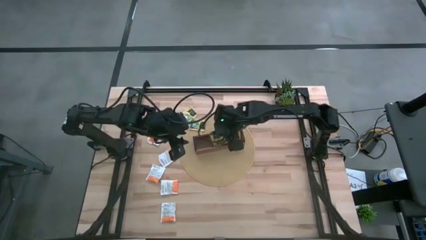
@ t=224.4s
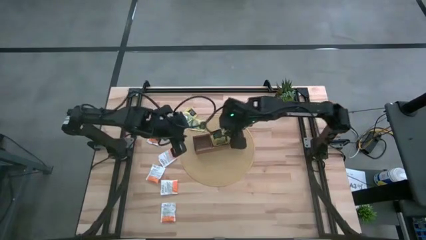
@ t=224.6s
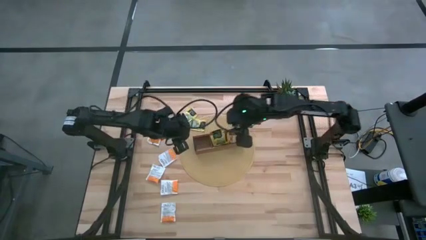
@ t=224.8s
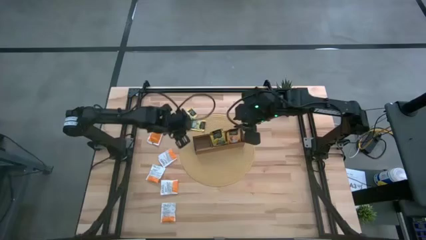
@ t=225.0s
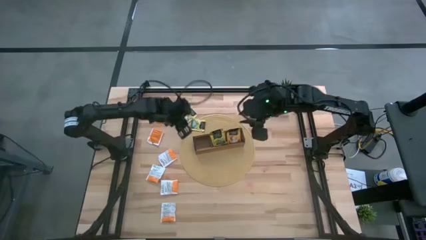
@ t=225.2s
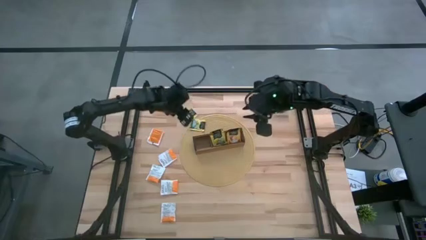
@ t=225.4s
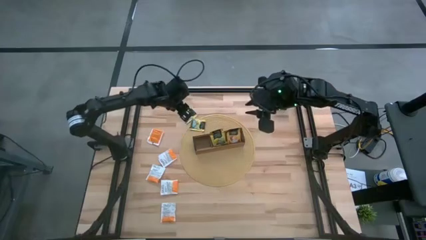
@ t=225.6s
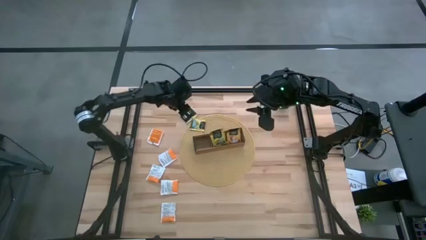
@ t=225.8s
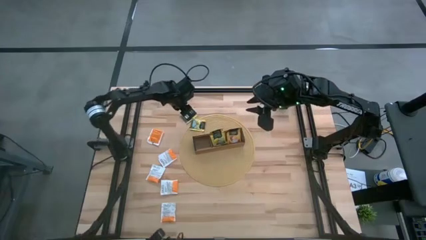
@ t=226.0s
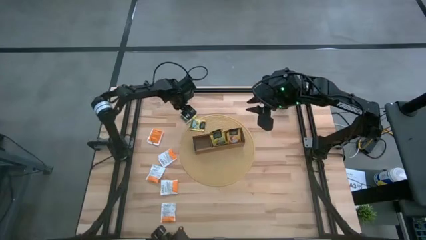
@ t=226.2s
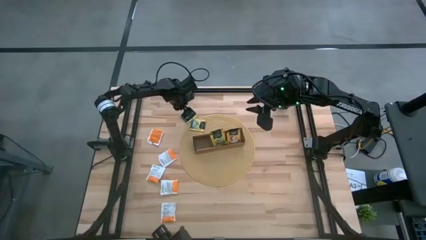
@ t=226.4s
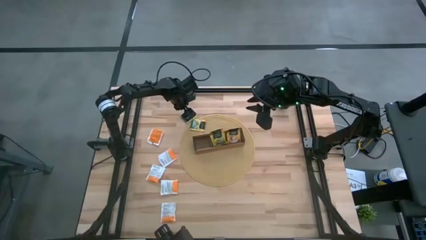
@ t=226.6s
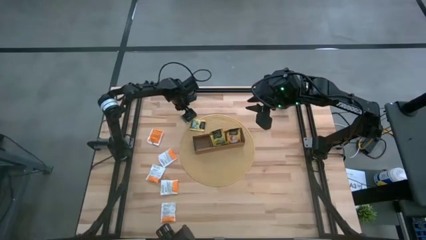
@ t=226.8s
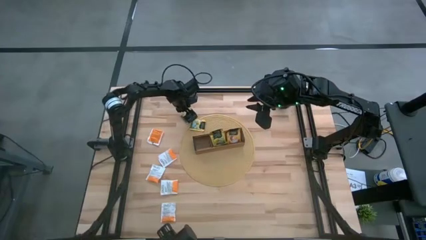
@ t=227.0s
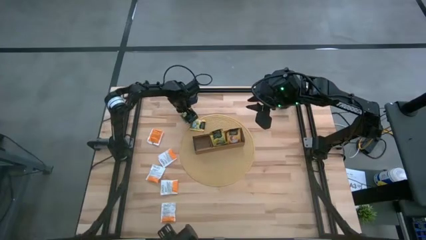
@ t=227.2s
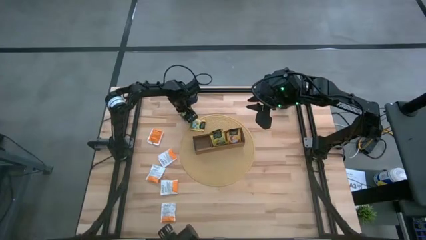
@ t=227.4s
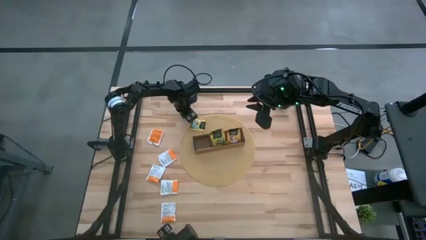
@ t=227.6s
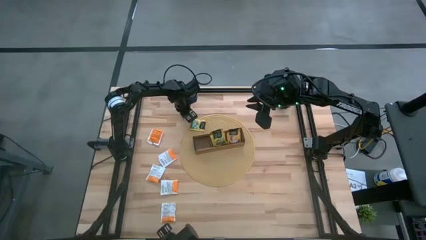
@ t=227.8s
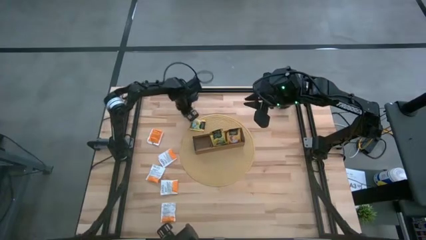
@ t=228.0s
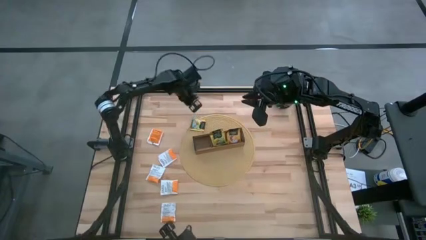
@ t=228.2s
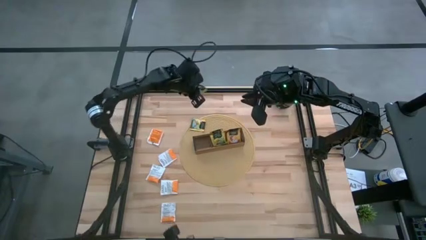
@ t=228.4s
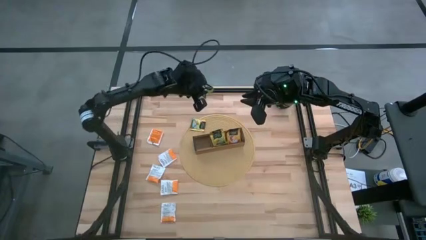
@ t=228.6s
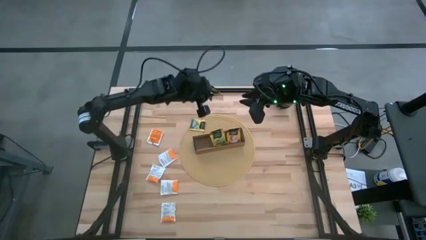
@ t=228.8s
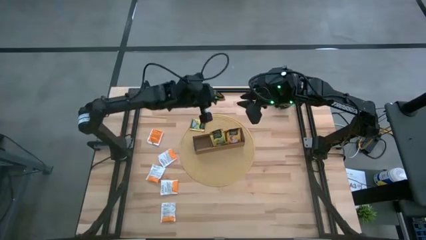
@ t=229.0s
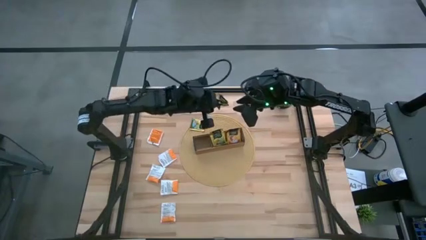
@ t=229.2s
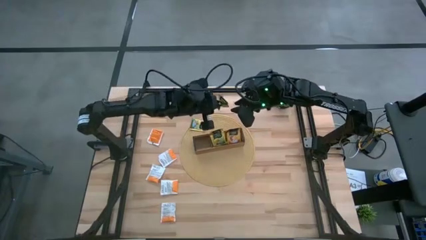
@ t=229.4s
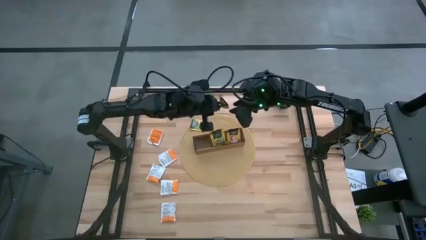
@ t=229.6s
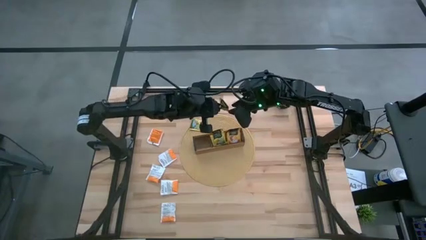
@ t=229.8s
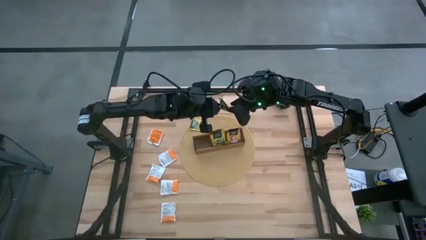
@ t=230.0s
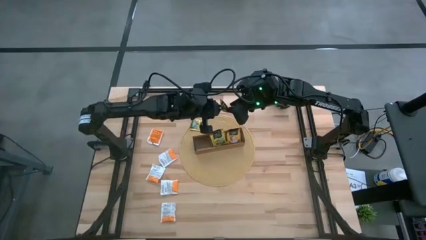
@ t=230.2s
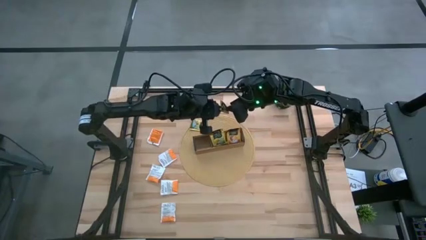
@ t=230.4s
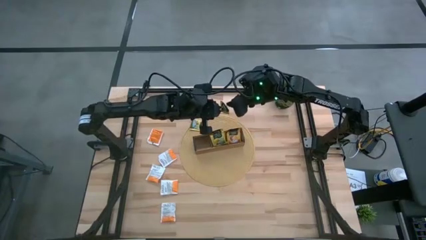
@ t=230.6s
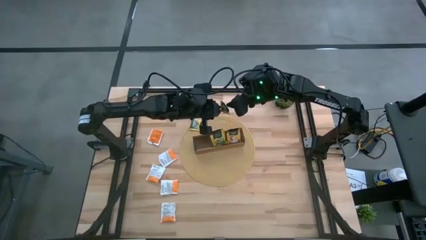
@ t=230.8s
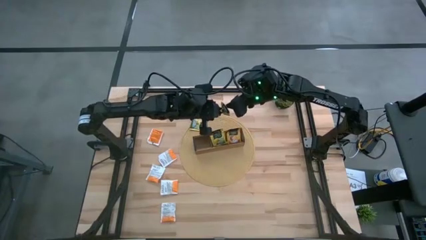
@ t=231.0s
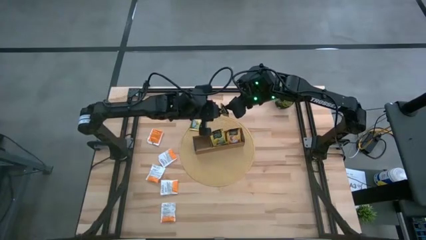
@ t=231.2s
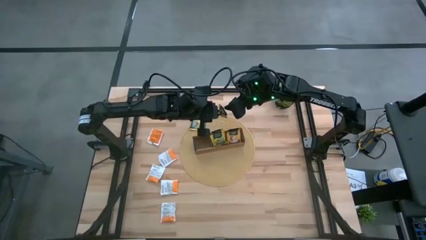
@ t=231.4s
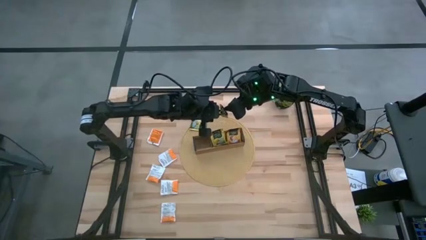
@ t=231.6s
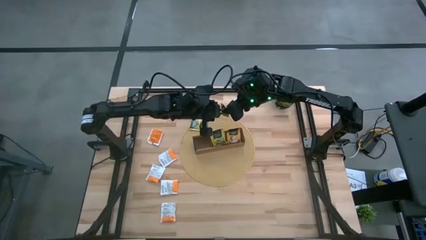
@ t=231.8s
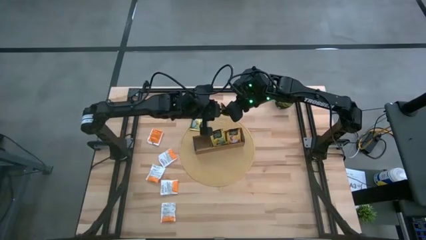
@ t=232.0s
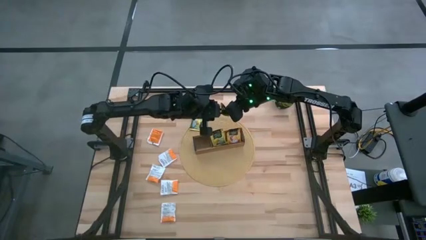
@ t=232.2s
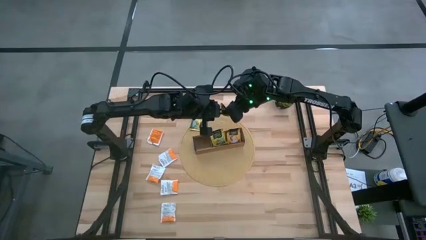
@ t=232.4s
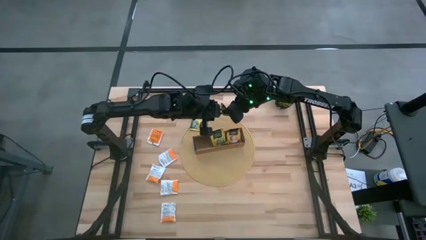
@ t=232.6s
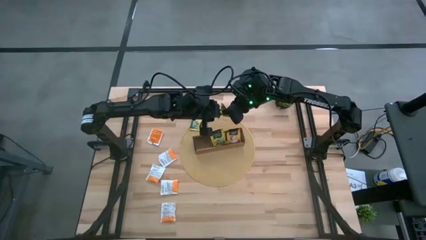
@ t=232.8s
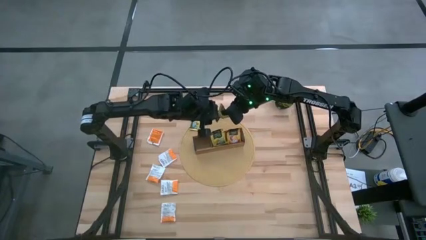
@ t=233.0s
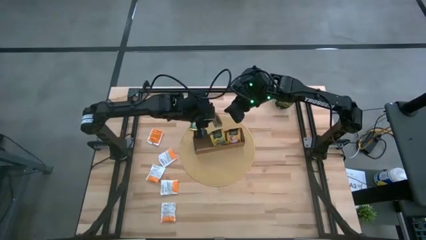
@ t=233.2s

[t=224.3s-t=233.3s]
Task: Pick & Place Tea
Put the yellow tea bag into the middle section of the wooden organizer

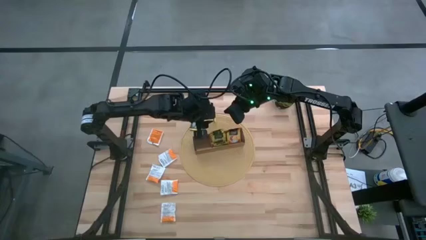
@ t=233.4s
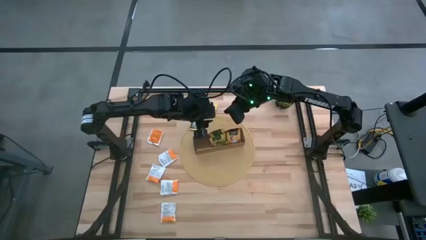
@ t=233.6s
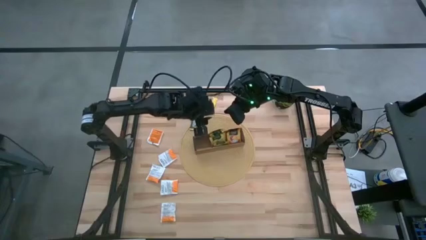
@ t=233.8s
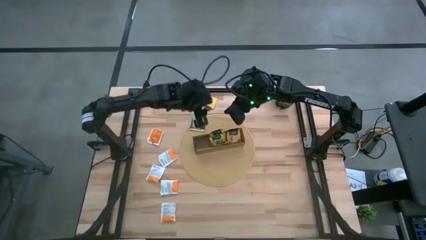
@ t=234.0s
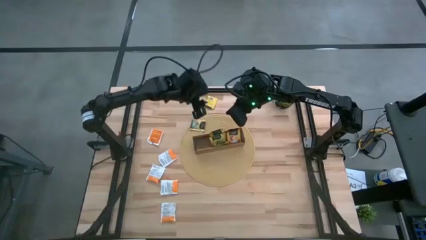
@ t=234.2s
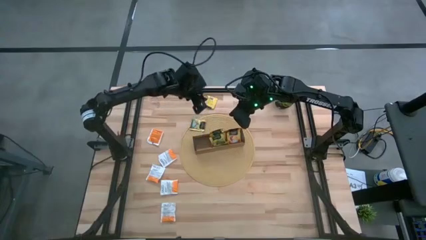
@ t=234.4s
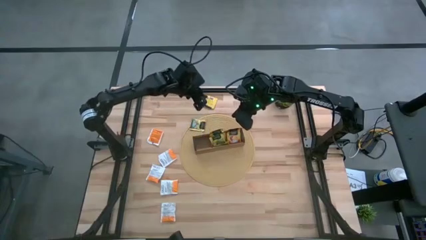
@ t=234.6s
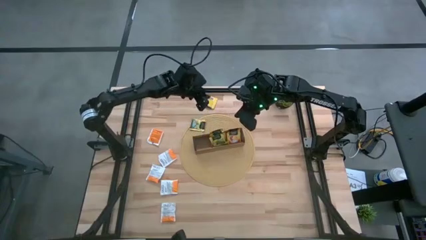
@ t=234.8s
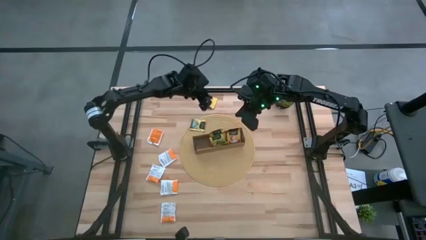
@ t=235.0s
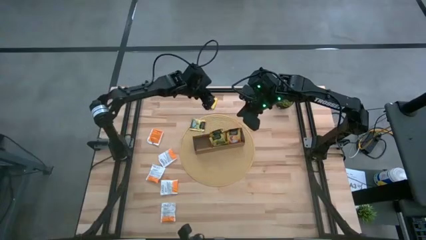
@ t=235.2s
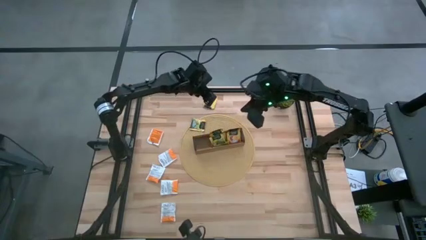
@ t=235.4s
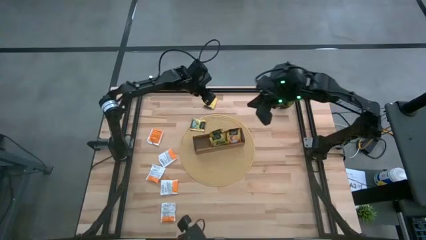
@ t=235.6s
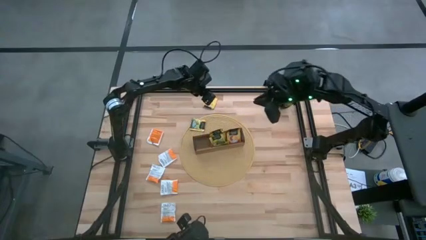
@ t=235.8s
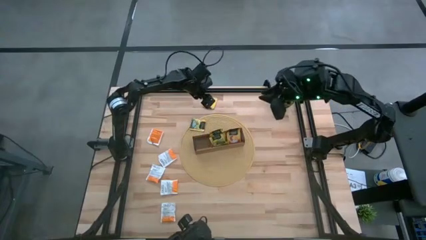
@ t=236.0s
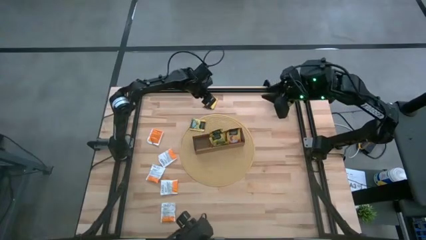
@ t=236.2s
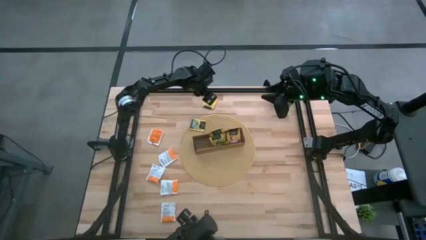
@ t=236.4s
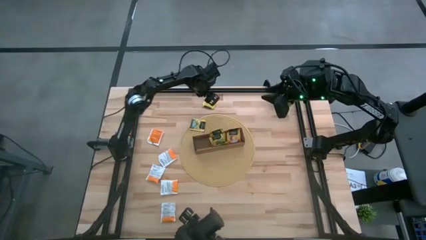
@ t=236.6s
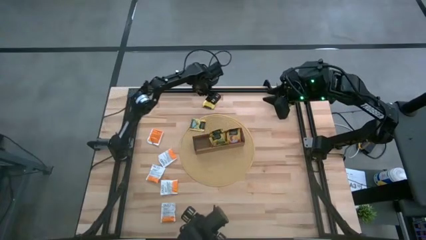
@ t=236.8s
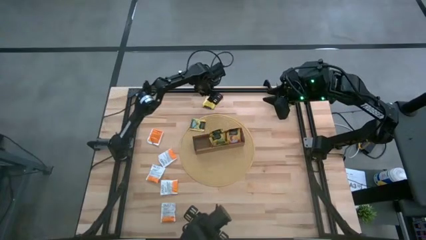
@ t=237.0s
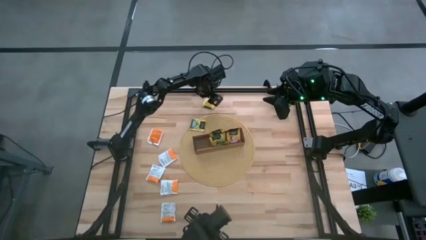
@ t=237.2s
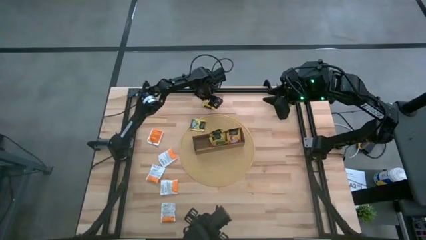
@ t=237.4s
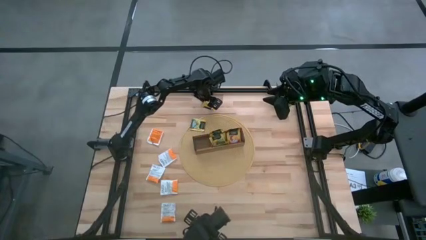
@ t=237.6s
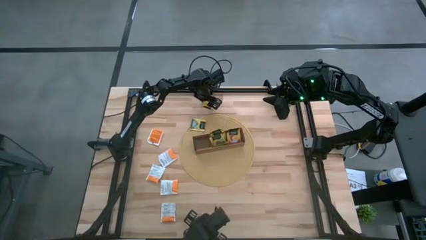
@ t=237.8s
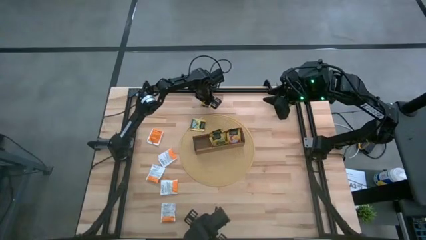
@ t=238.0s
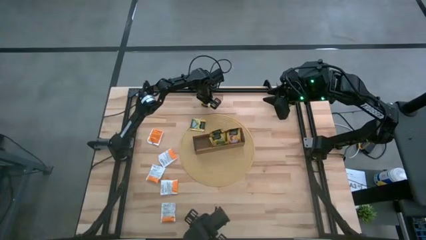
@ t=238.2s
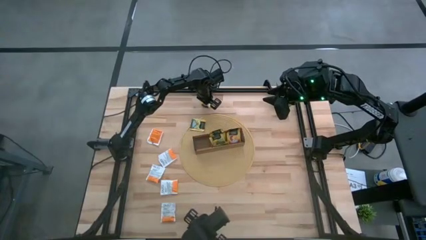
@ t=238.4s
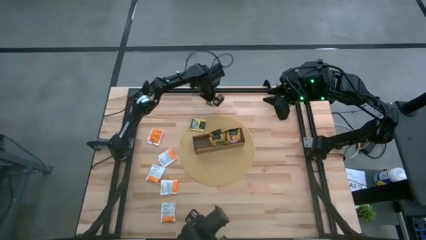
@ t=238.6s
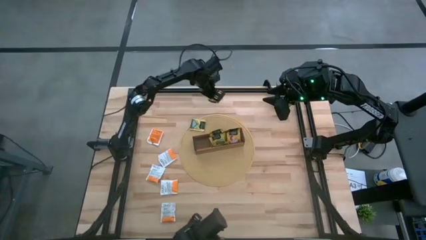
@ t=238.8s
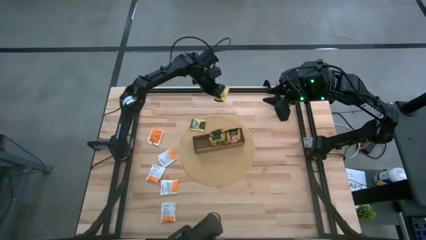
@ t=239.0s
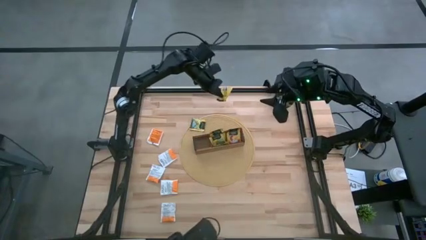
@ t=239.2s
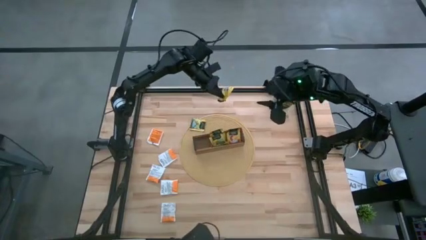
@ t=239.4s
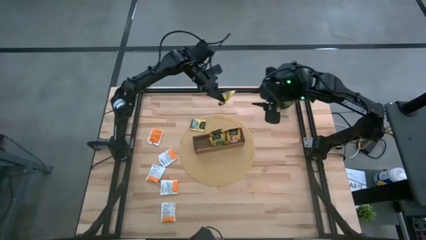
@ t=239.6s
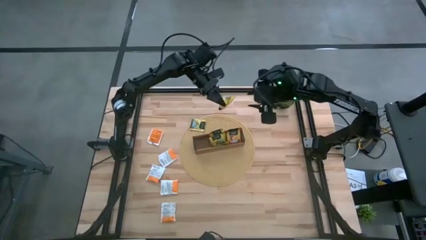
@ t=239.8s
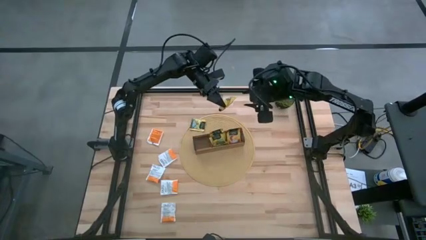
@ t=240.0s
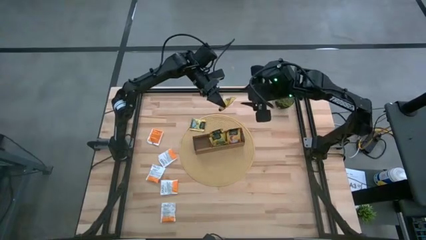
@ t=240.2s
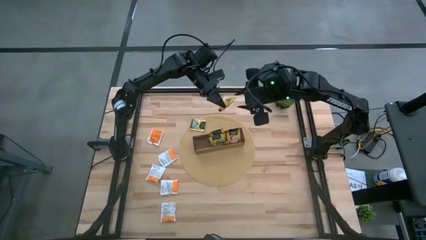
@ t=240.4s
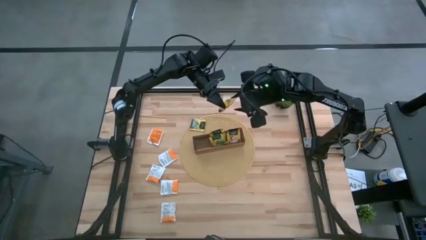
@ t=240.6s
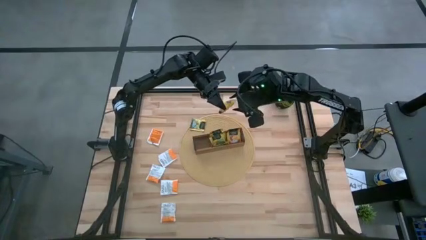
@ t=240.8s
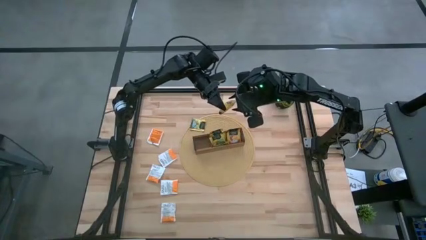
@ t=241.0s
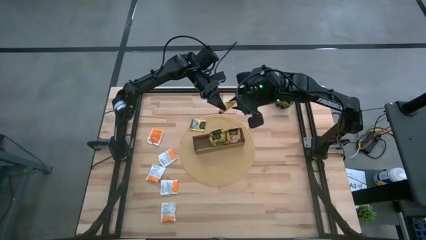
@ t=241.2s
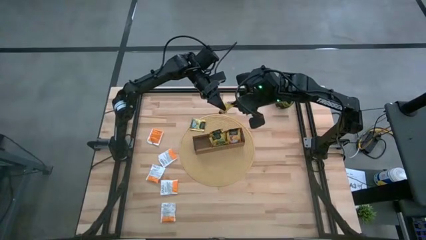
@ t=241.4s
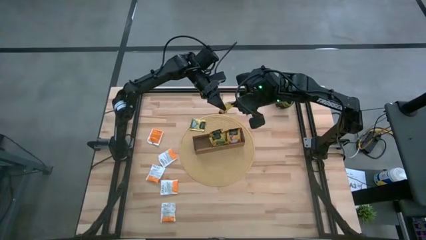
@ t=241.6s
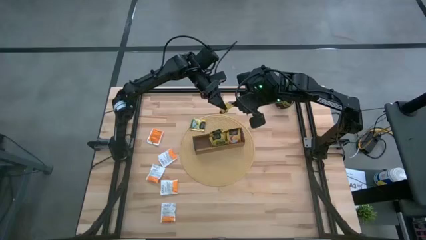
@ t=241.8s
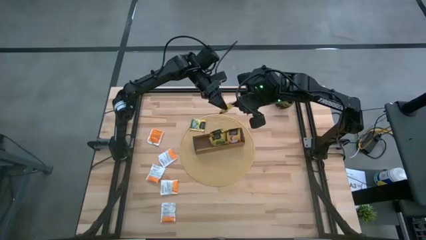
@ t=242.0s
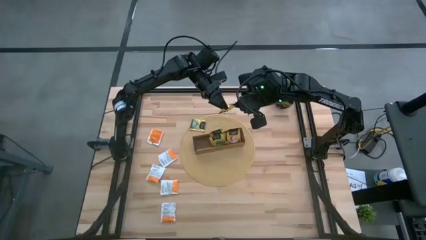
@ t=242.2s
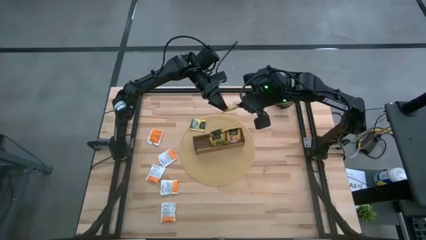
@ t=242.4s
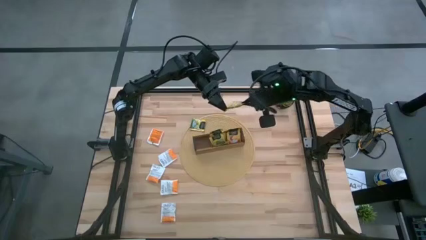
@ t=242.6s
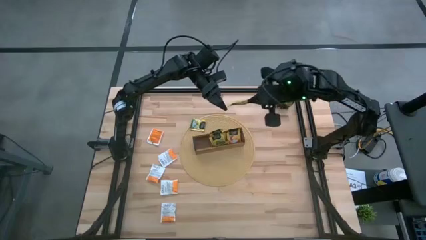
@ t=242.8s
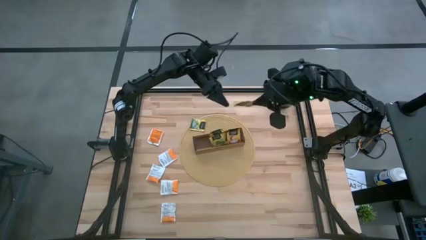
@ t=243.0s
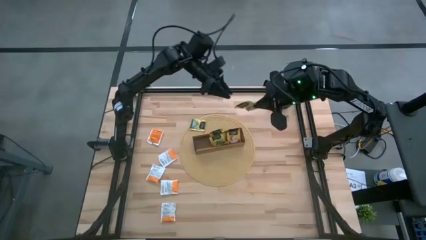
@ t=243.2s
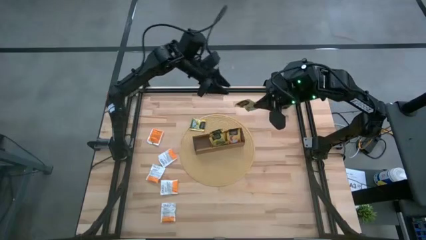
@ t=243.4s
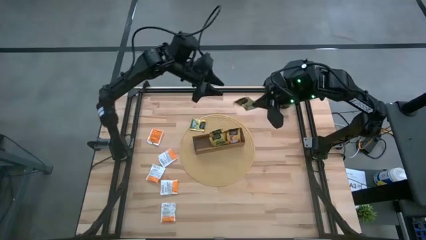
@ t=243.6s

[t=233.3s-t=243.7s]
Put the yellow tea bag into the middle section of the wooden organizer
